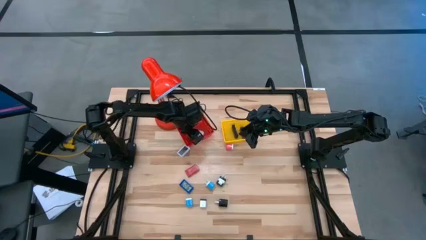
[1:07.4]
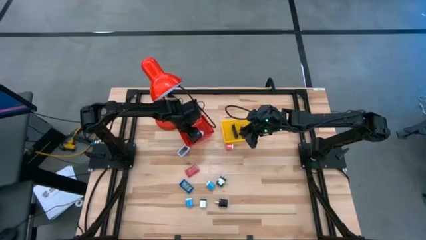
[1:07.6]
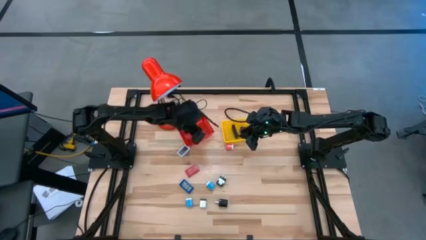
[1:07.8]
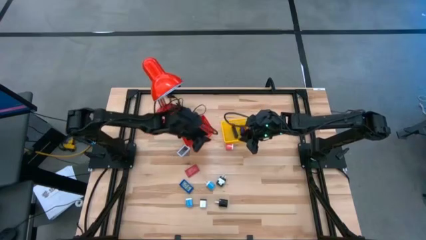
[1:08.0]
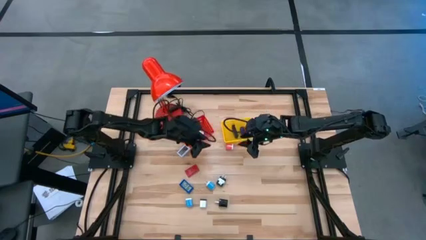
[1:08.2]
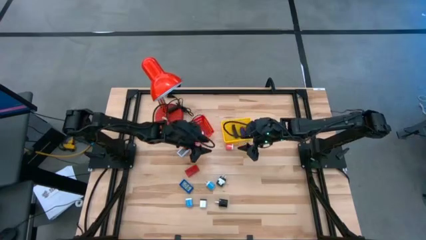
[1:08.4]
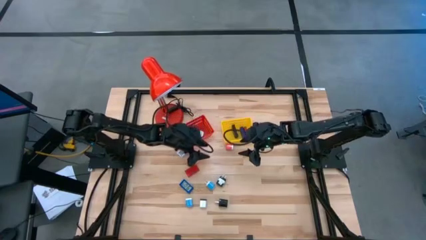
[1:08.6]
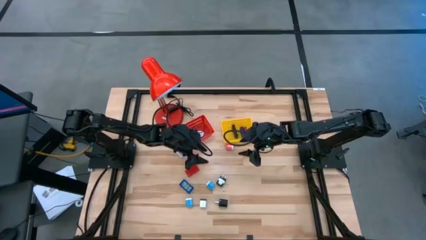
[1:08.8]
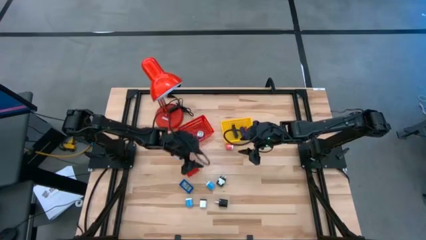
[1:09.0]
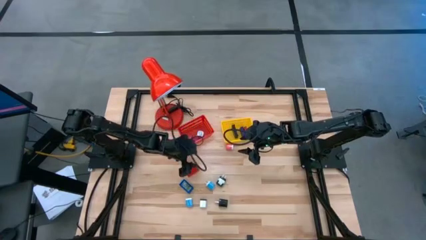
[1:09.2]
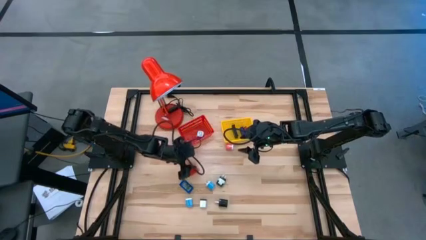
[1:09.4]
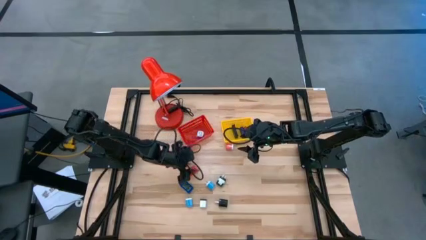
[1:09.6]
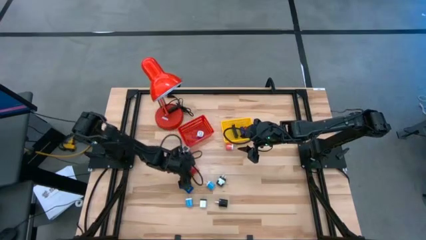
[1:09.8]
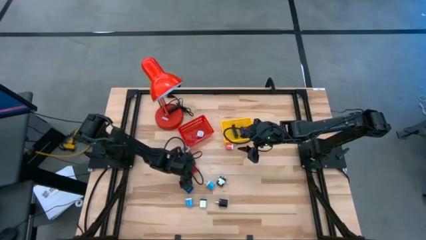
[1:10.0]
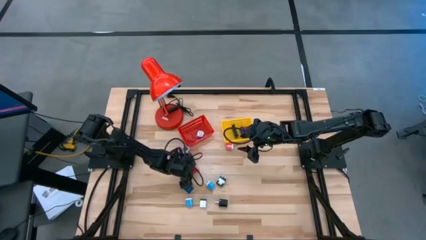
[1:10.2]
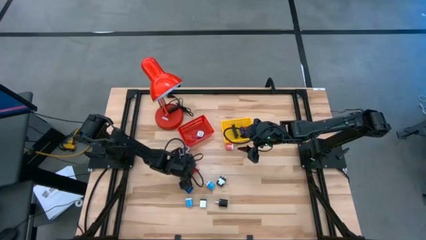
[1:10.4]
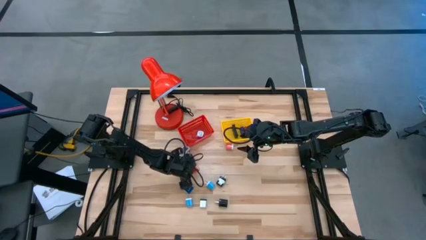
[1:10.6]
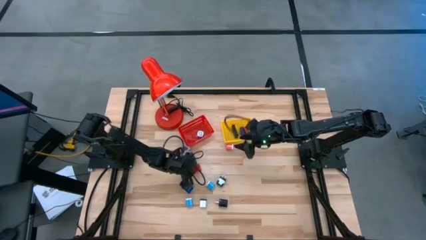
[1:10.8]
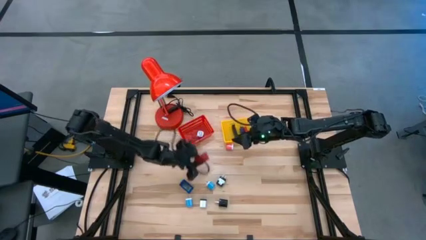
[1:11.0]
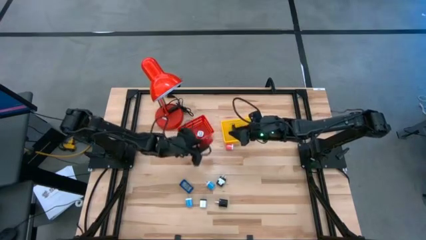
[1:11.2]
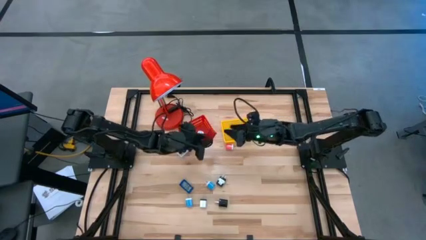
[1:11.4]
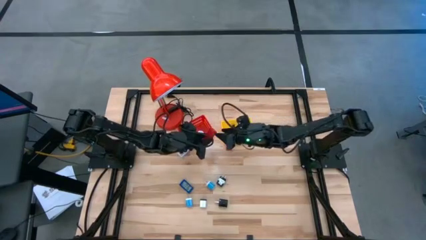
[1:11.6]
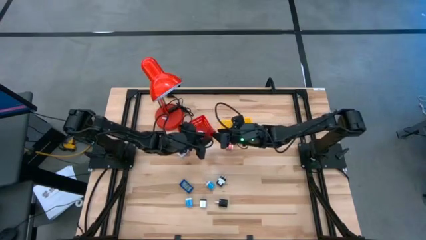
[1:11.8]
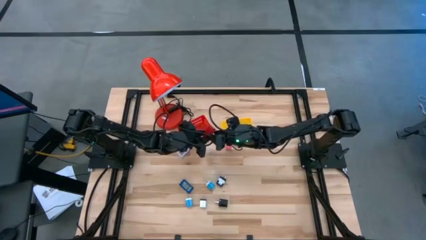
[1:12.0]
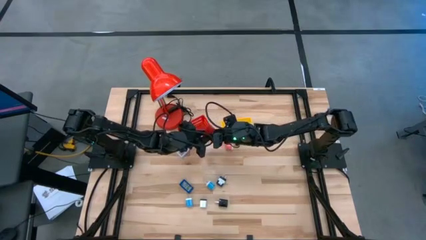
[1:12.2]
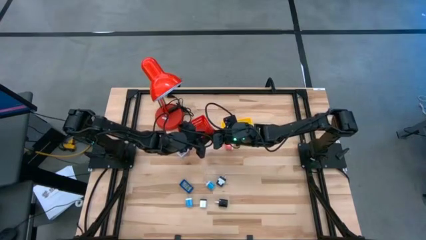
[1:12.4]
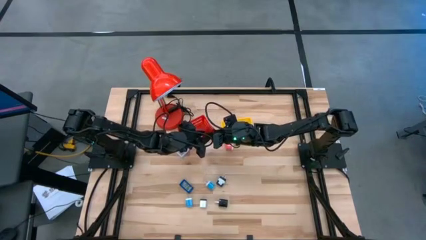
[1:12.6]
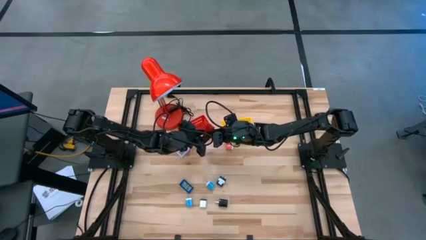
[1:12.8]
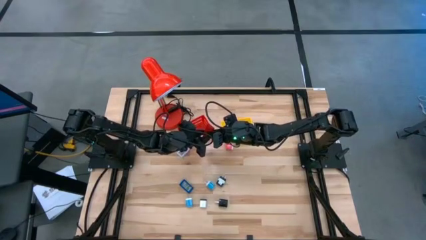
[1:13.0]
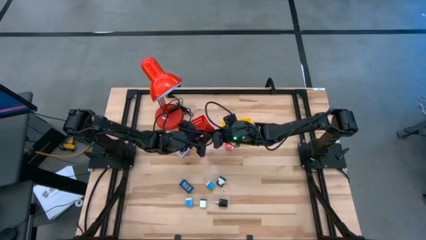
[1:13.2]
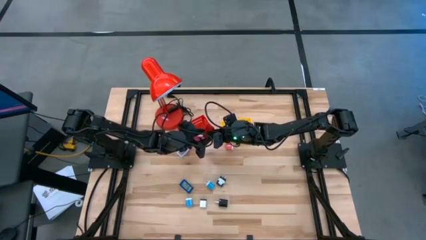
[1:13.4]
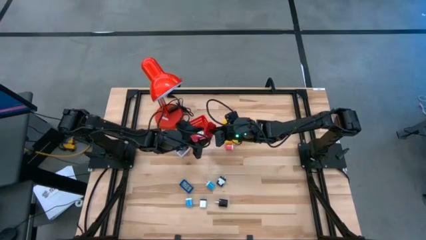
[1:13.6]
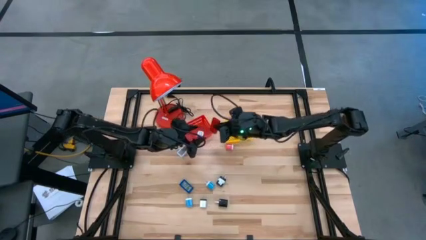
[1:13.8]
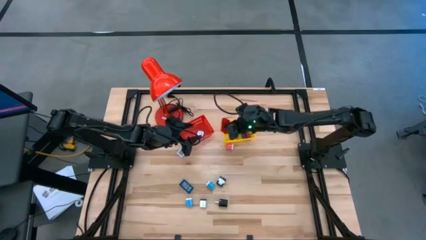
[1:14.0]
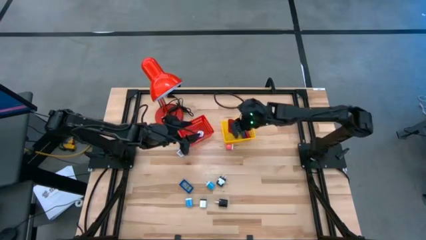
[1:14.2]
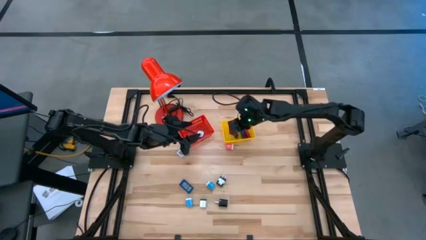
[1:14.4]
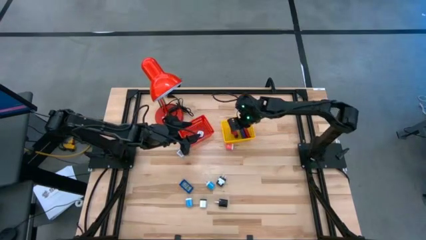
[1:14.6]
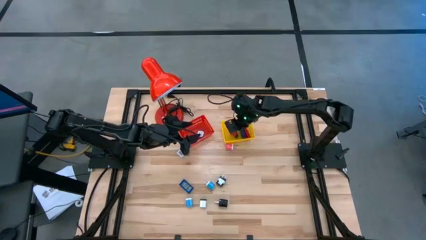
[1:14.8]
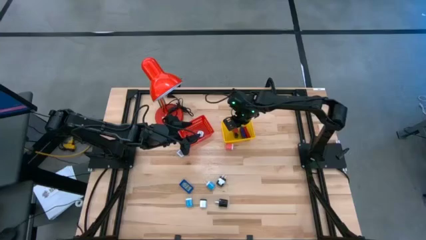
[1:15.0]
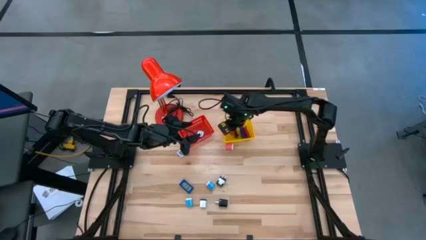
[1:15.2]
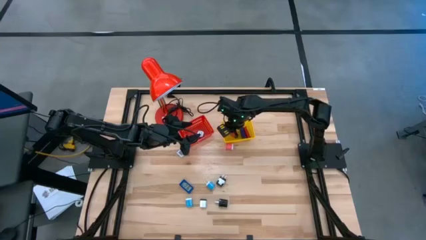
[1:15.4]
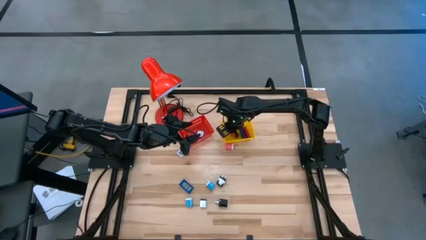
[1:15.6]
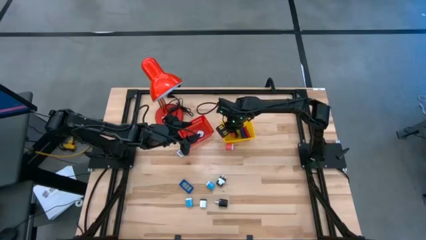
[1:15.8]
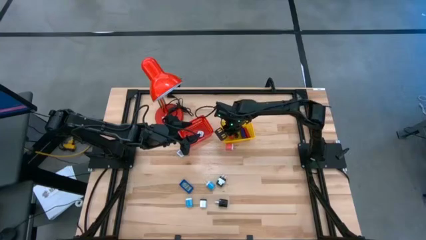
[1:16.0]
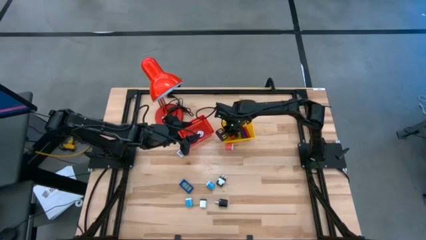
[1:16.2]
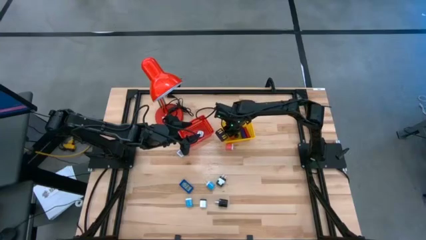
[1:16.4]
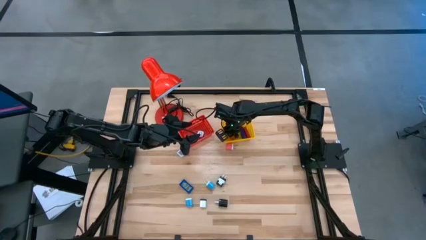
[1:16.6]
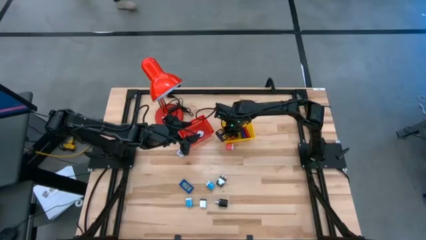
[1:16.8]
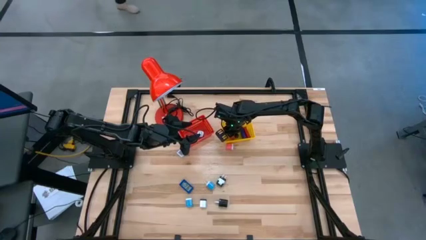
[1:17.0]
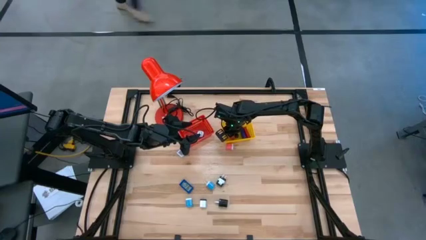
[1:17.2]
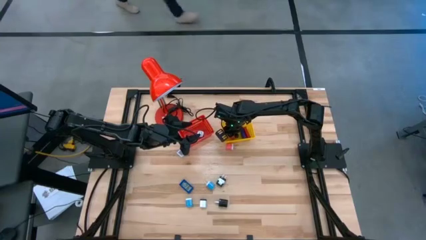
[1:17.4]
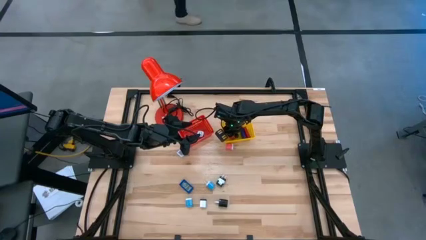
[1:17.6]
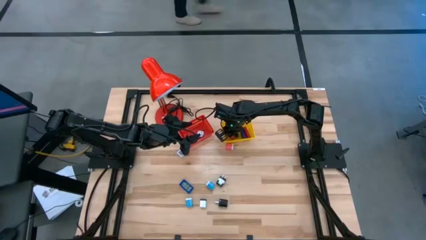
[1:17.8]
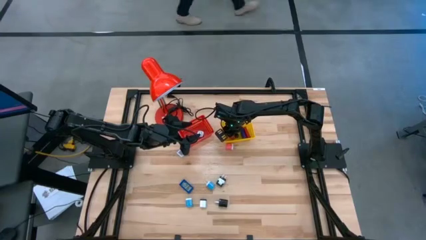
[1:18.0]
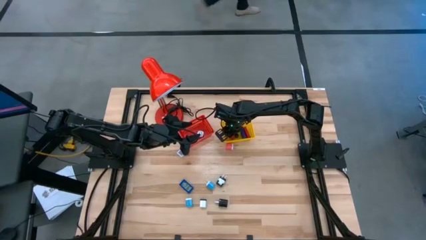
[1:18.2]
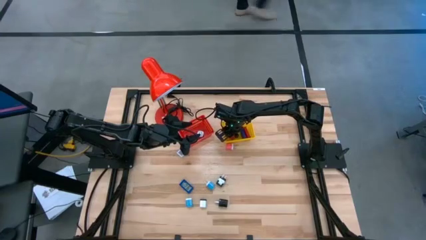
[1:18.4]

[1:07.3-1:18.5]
Task: Pick & Place Office items
Put the red digital timer into the yellow bin
